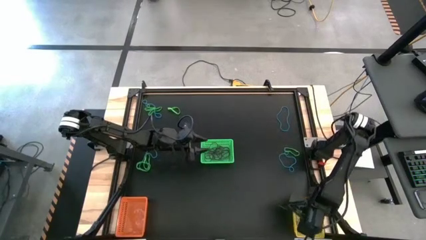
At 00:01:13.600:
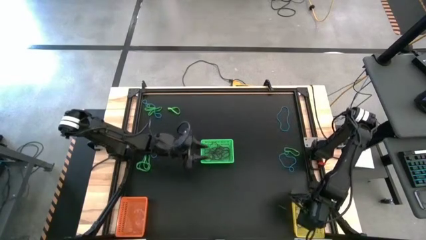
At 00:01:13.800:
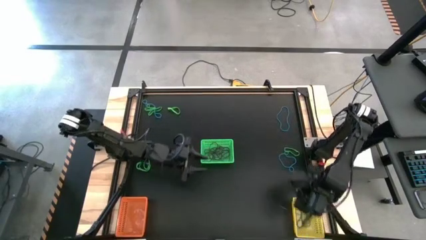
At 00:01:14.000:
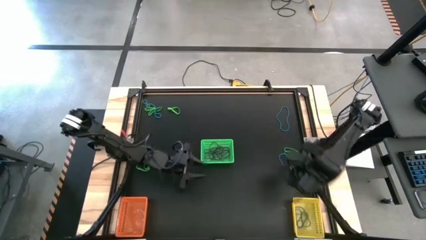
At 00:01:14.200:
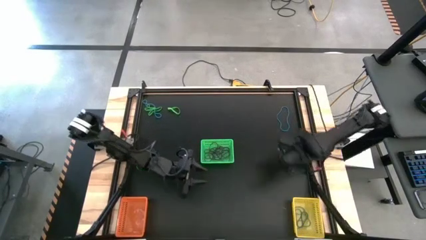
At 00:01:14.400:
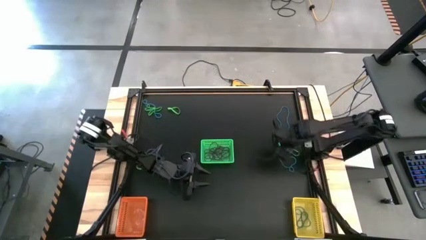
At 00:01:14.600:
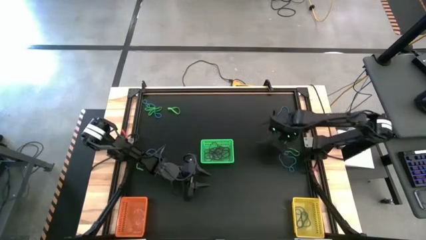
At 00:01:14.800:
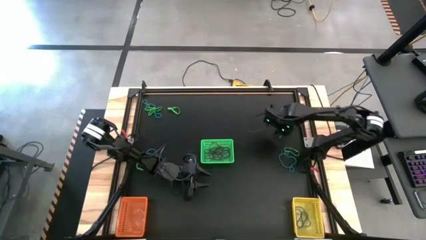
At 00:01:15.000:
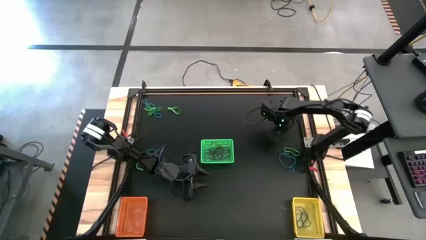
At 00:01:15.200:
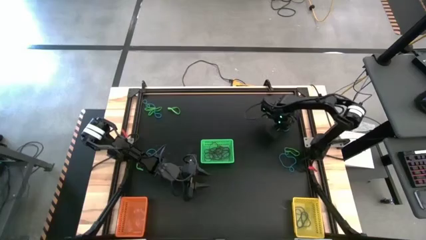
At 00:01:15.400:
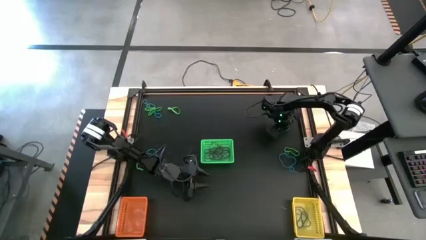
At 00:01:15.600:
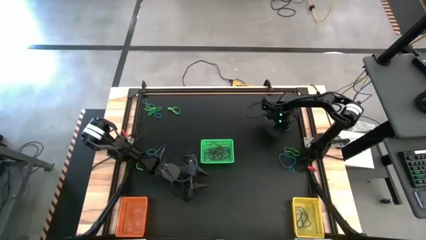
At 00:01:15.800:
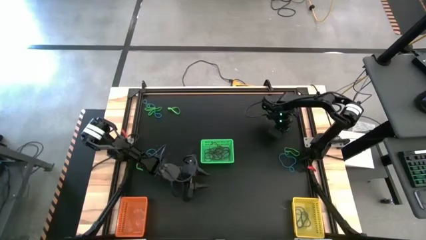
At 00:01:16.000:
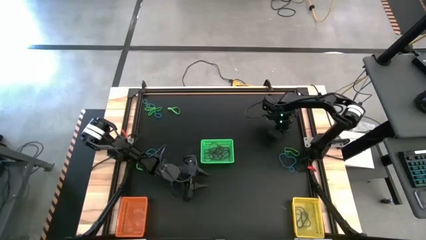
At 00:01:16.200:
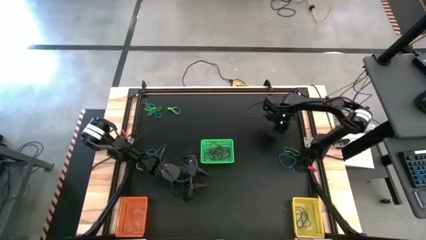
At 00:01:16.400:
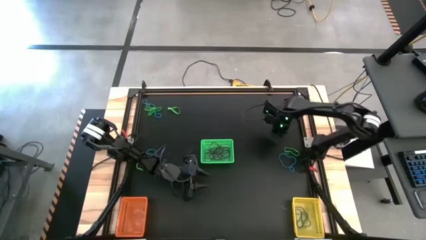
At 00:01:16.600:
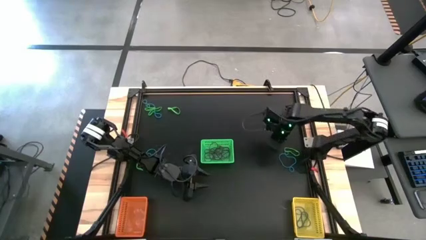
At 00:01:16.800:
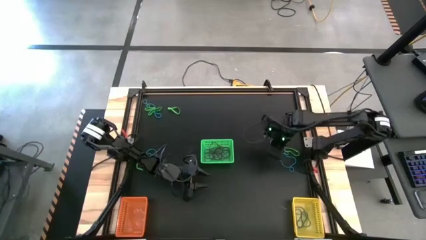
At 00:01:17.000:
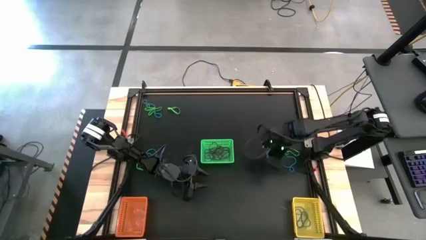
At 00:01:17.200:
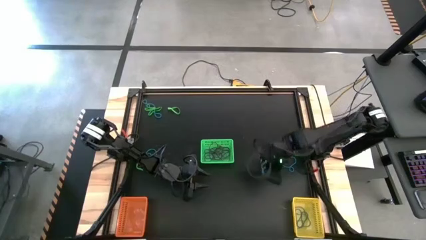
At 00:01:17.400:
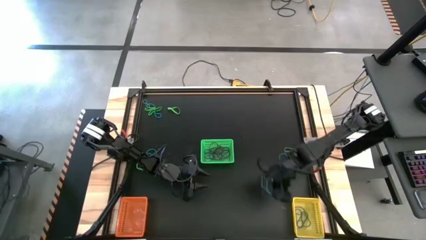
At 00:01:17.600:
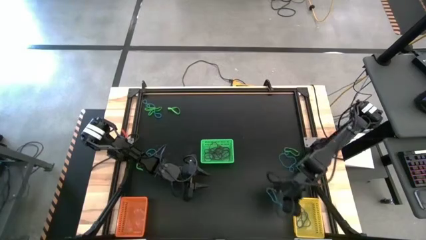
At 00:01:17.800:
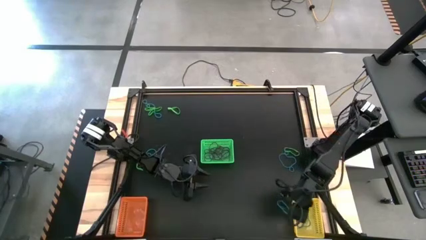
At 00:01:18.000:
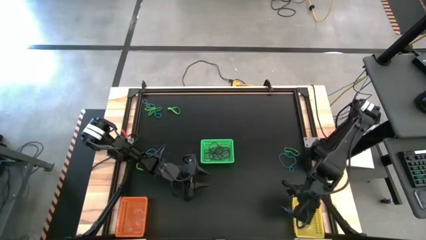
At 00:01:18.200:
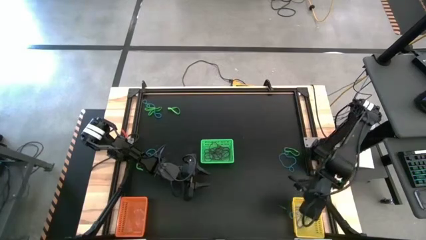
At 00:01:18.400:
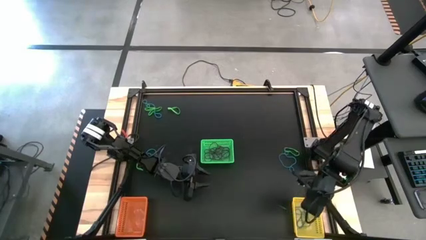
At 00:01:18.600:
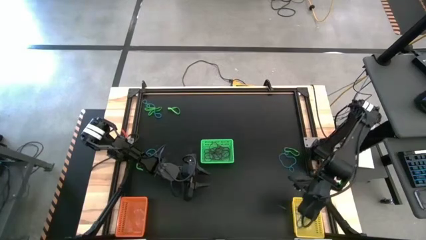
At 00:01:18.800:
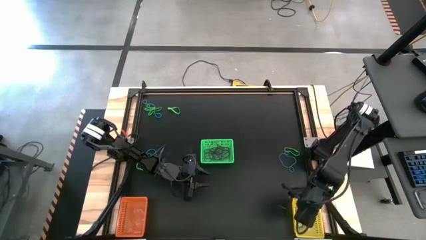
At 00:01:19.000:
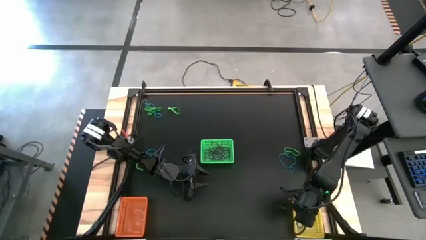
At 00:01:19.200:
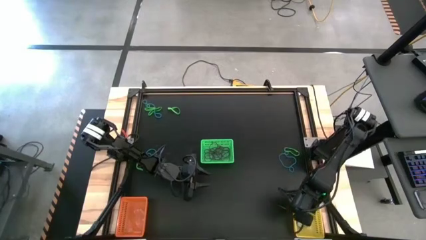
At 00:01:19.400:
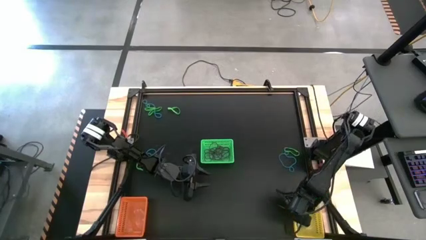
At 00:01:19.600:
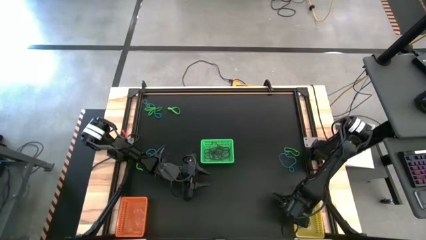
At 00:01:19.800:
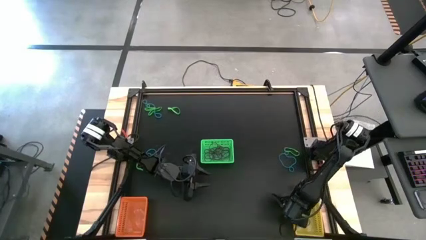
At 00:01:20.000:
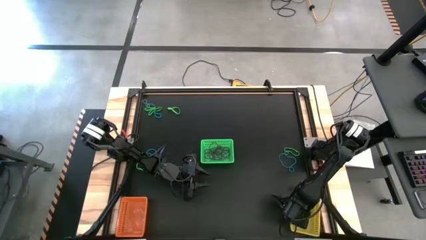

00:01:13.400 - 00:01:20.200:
Task: Sort rubber bands into baskets
Put the blue rubber band into the yellow basket

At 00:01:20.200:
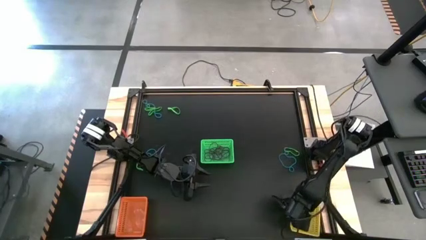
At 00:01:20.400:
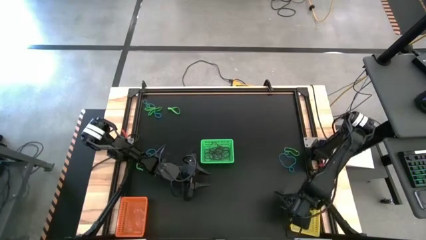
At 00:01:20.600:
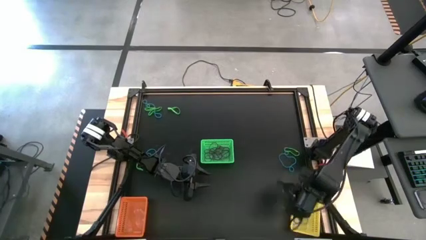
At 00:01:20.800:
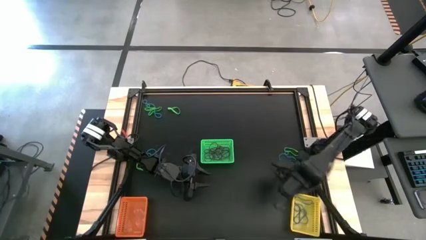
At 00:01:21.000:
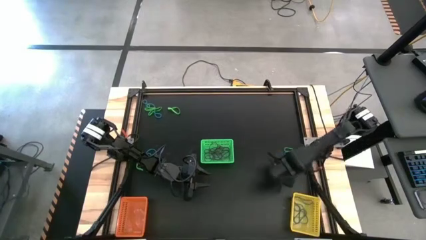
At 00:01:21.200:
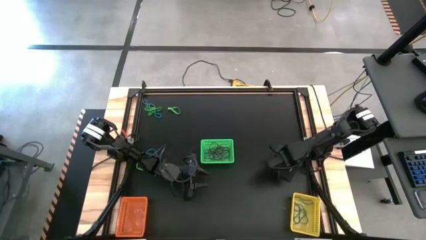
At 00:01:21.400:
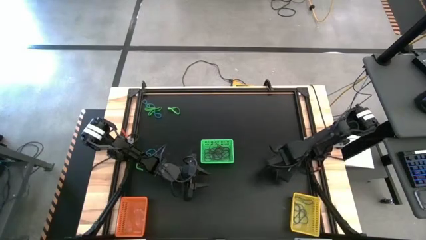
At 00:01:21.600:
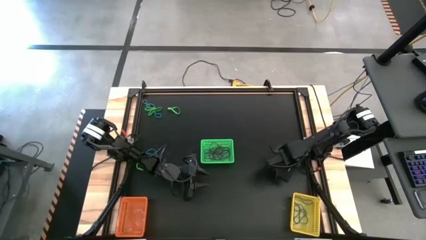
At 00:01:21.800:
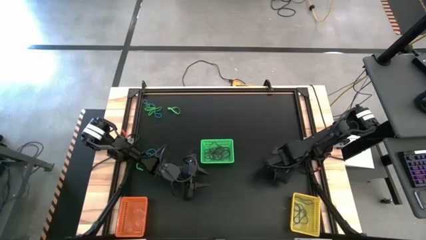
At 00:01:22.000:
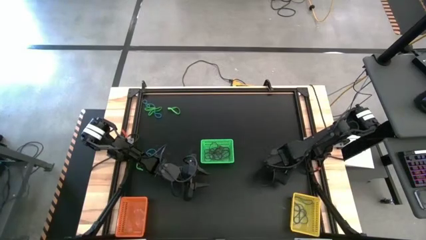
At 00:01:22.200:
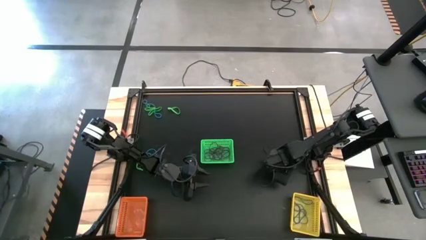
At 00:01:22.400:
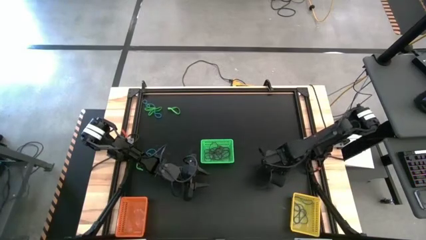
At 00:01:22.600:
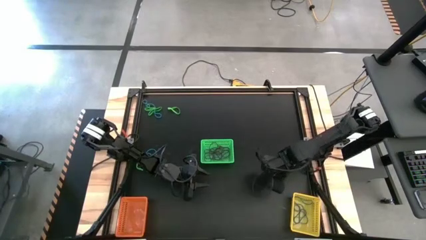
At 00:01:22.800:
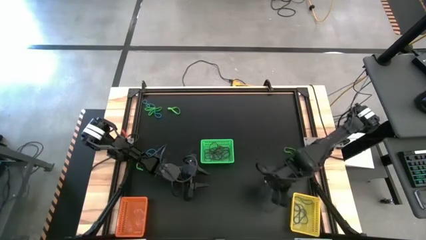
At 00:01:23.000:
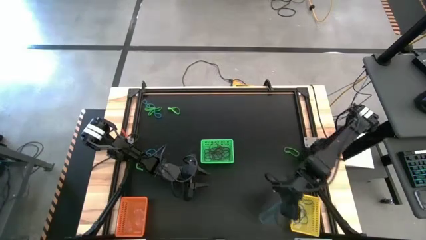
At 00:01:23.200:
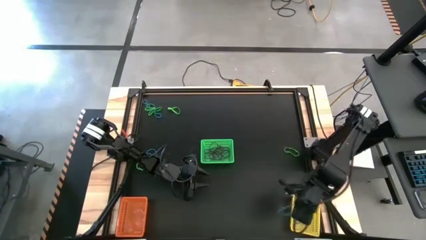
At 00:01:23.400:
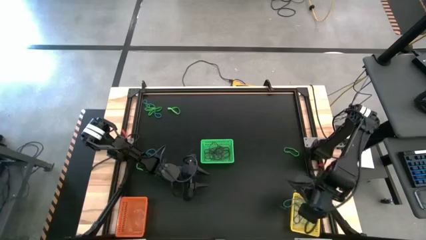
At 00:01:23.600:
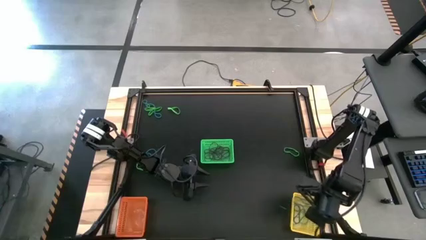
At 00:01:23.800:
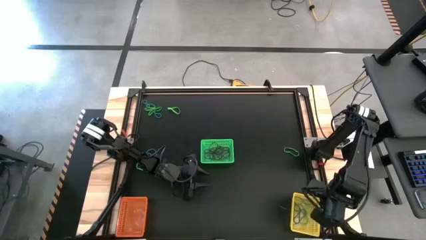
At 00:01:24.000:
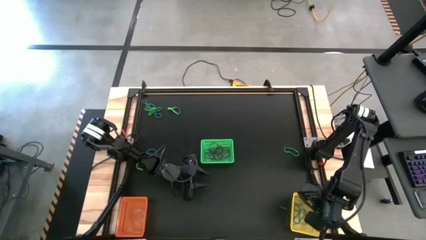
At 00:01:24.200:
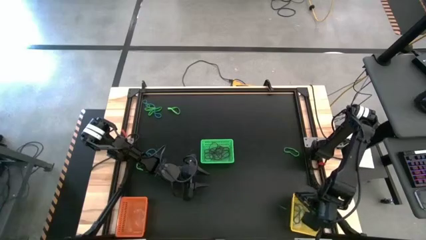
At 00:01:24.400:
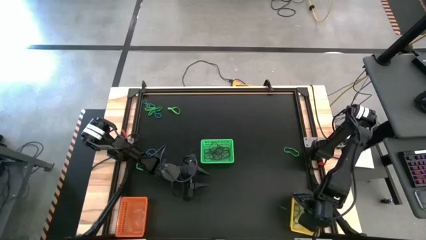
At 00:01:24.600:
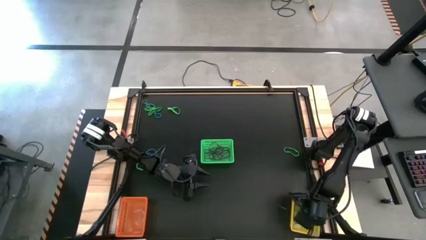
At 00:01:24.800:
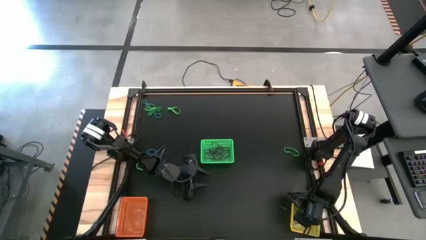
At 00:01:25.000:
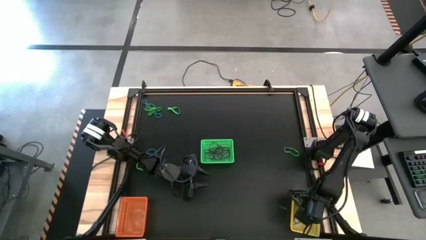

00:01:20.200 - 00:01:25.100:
Put the blue rubber band into the yellow basket

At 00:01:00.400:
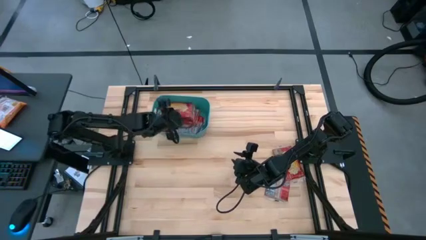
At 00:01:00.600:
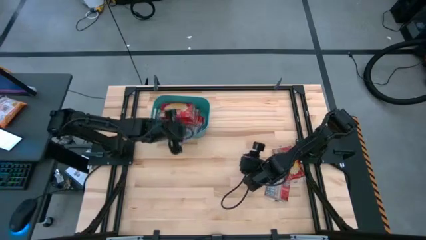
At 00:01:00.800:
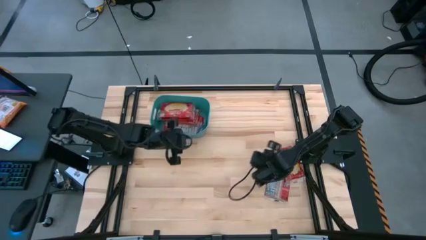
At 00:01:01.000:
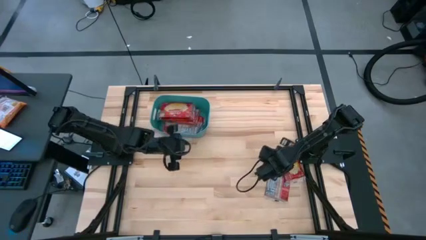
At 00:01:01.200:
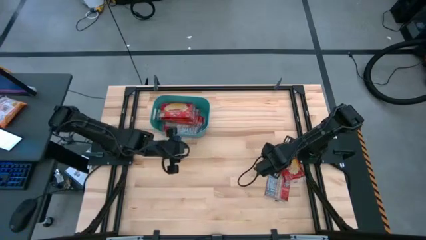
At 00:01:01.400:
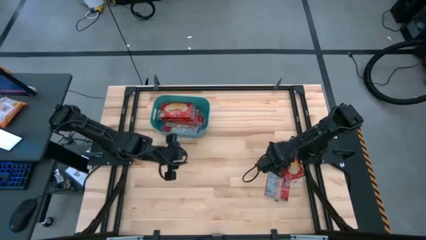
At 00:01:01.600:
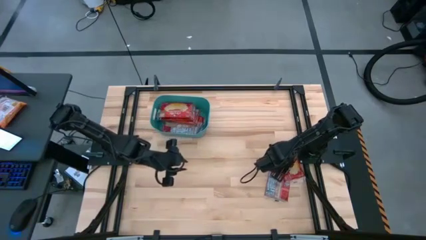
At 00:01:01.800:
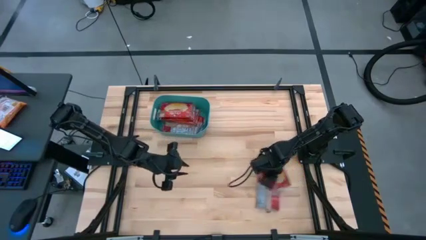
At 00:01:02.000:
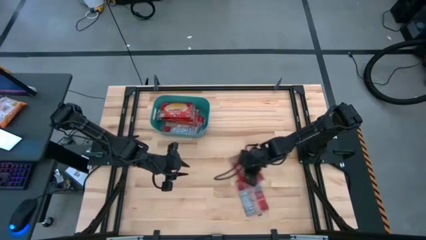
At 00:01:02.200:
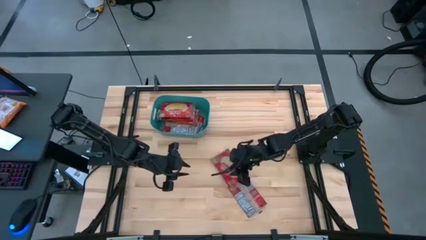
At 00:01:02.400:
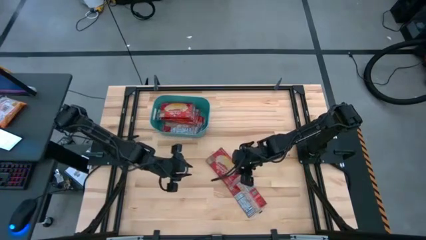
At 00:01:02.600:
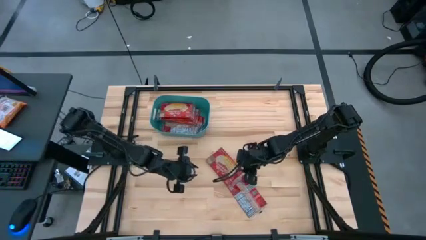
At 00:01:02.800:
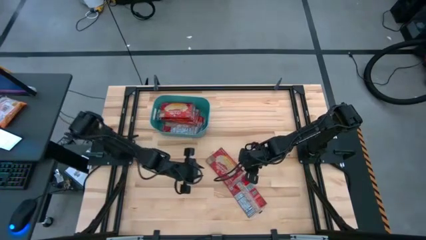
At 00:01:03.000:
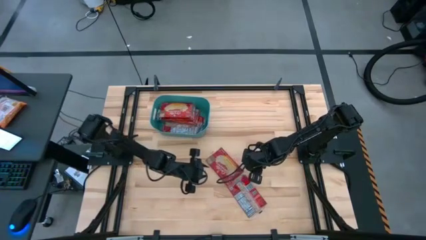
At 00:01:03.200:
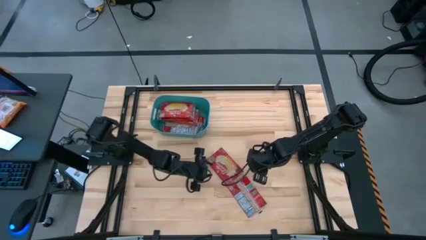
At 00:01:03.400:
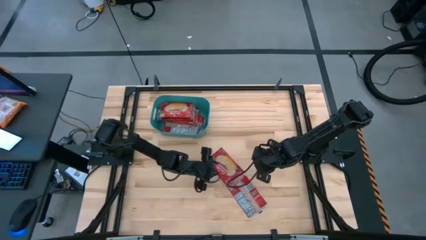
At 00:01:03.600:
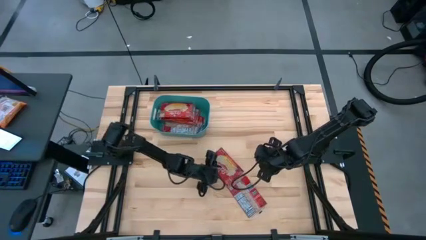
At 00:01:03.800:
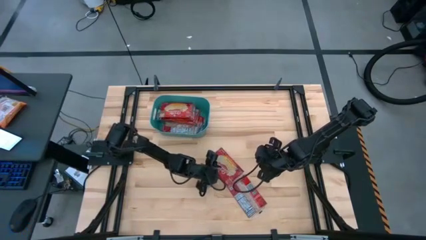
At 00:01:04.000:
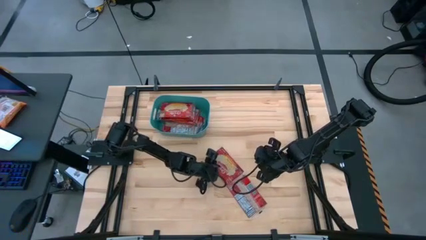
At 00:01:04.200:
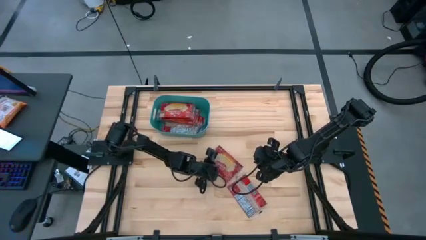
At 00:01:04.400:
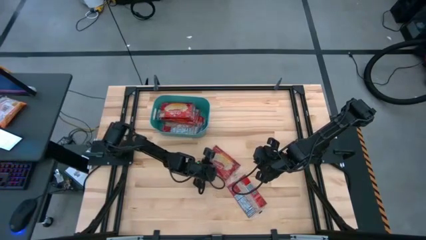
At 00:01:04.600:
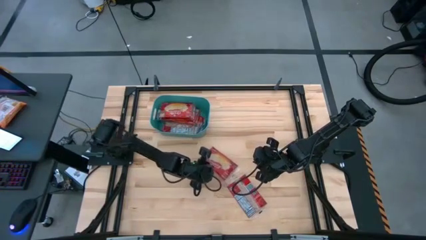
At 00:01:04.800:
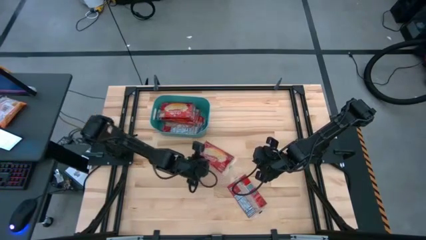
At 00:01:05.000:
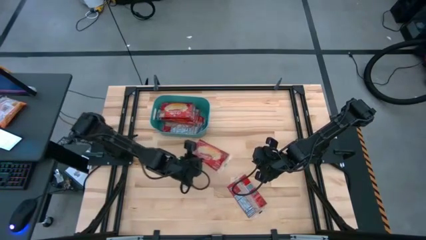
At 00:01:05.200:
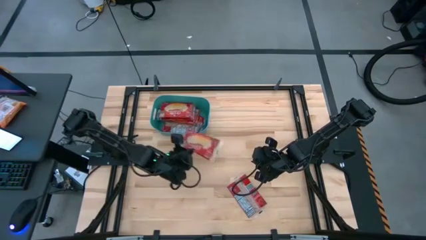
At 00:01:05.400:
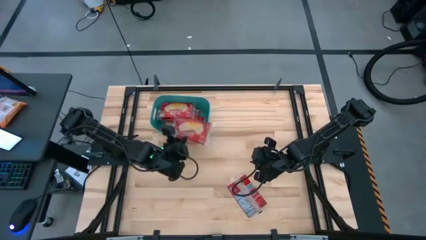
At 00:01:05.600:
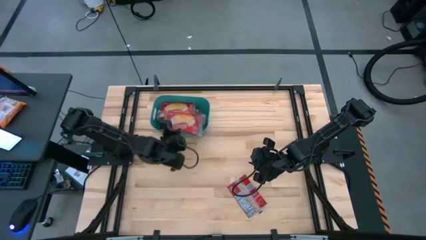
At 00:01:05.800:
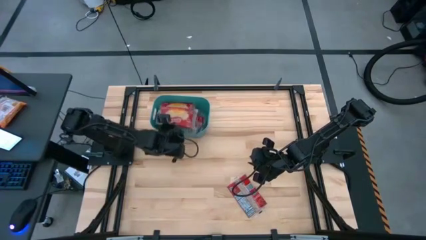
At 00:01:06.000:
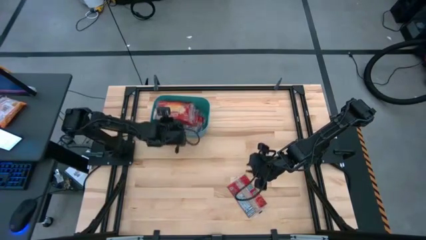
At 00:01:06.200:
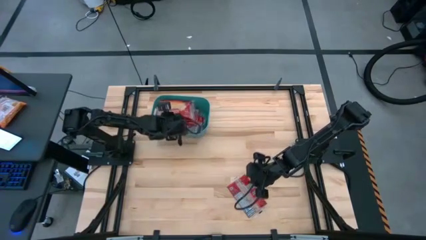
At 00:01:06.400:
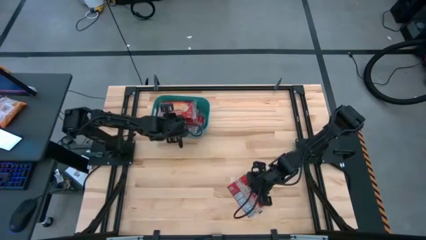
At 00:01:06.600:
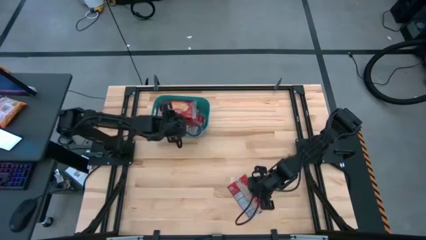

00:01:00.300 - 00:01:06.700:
Task: Sort popcorn bags into baskets
Put the red popcorn pack into the green bin
